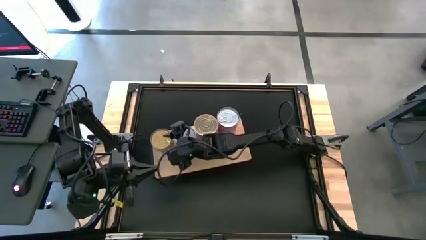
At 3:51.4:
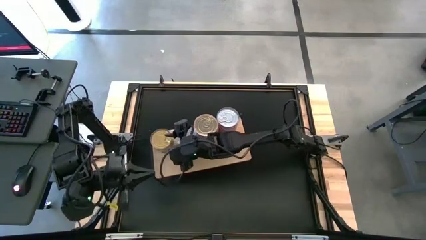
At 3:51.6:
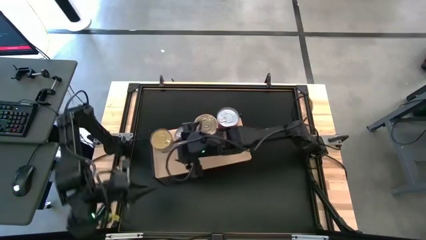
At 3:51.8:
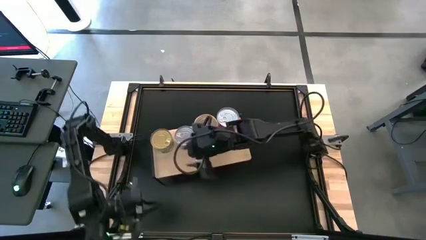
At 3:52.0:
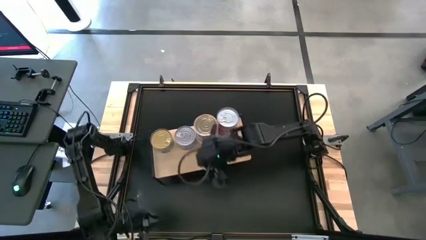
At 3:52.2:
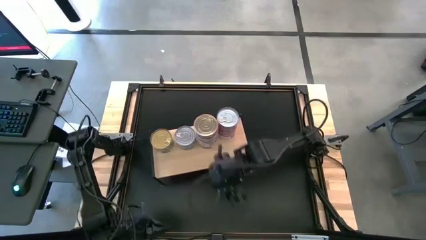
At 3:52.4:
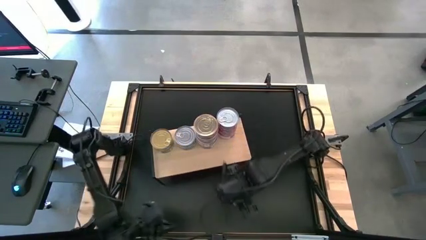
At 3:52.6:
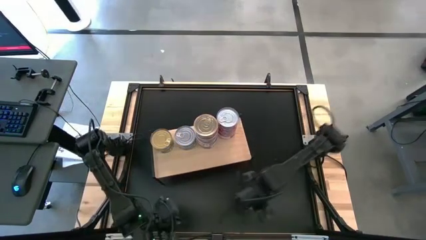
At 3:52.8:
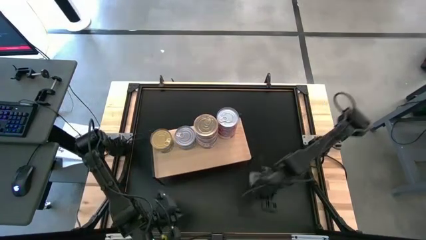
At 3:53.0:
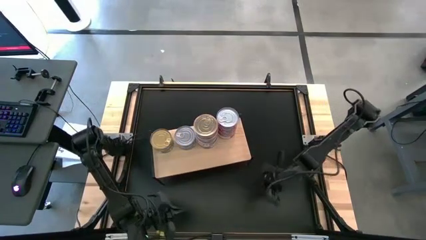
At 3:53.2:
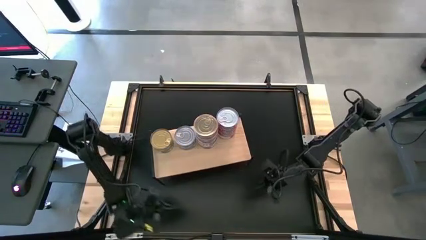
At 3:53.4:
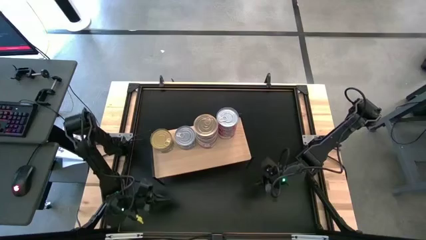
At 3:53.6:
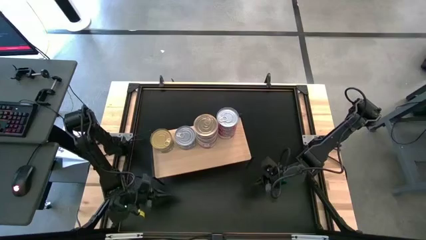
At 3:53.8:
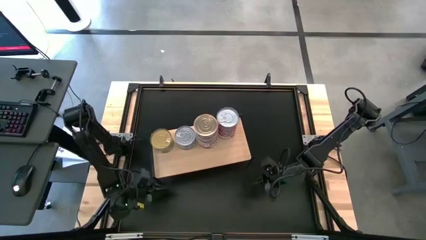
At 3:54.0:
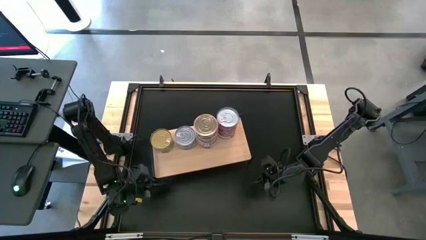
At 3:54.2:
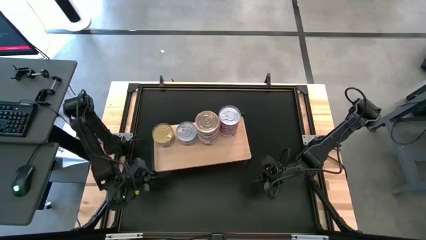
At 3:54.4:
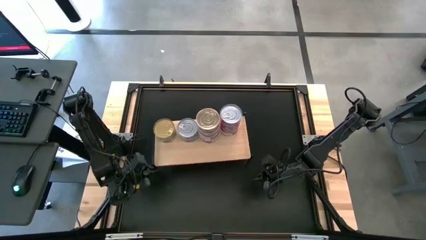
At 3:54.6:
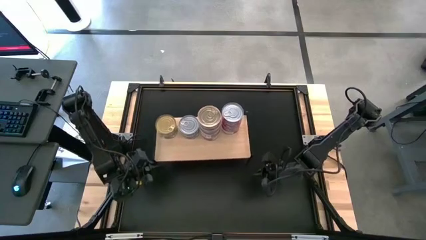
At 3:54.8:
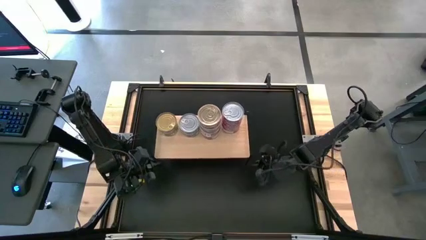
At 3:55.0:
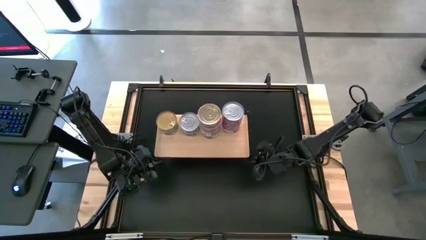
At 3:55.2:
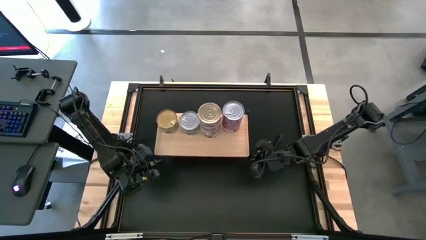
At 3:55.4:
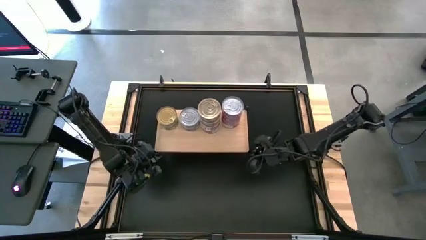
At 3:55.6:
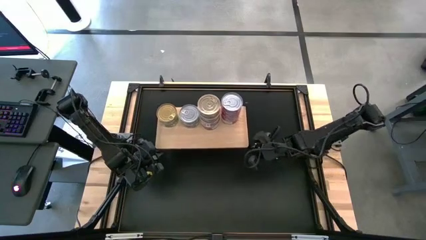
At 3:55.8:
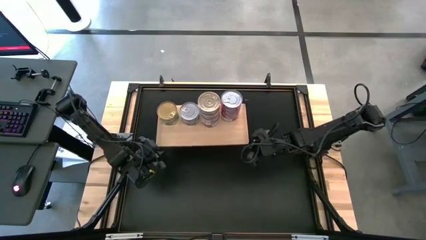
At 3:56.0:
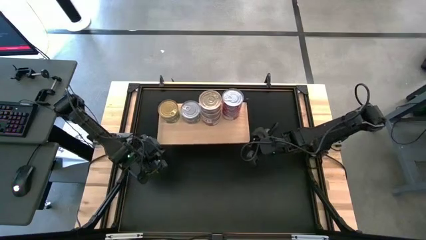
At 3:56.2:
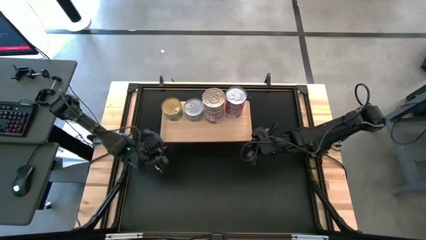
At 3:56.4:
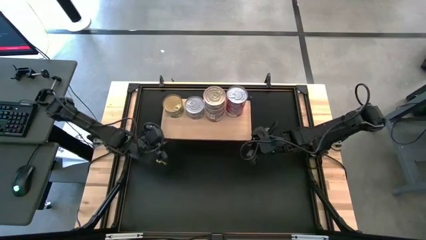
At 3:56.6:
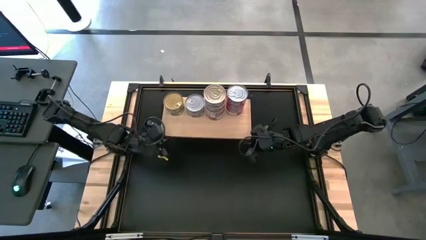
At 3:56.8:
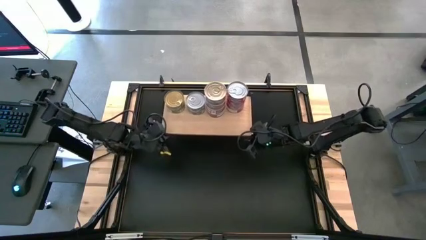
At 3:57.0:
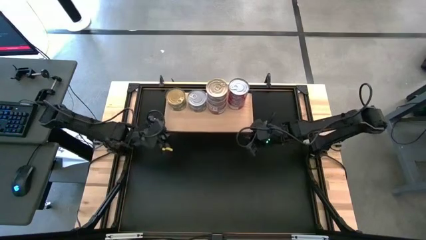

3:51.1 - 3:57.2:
Task: Stack canned seafood by type on shelf
Adjust the shelf to the top of the table

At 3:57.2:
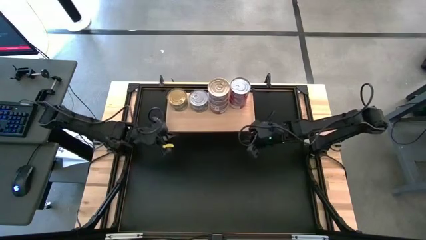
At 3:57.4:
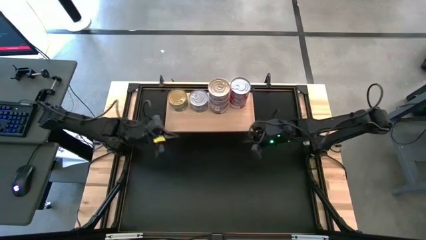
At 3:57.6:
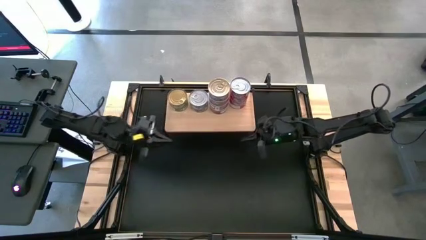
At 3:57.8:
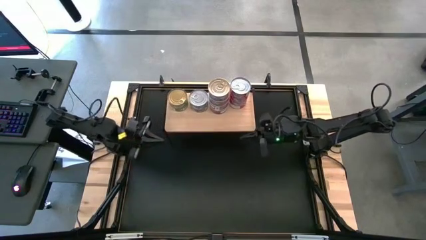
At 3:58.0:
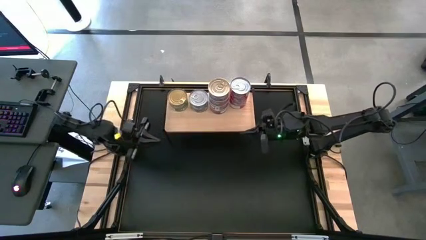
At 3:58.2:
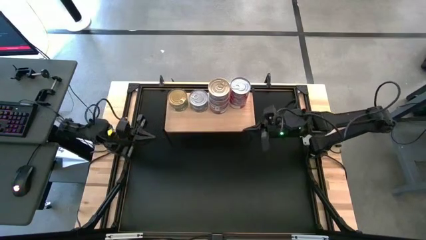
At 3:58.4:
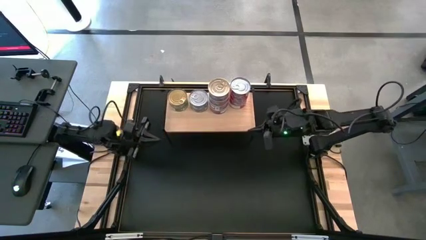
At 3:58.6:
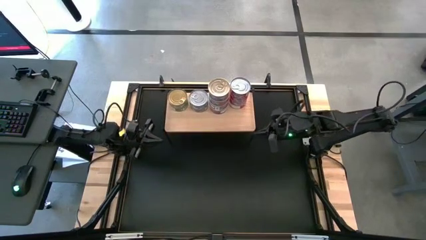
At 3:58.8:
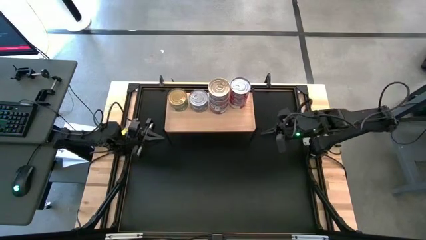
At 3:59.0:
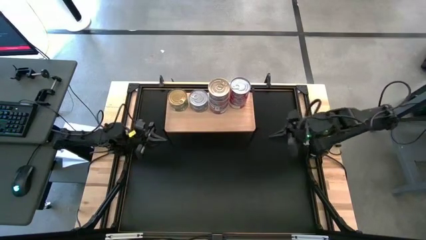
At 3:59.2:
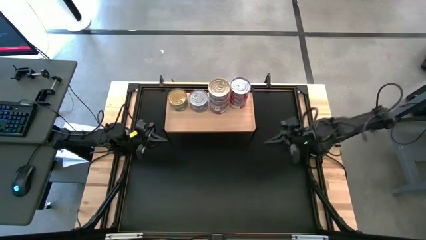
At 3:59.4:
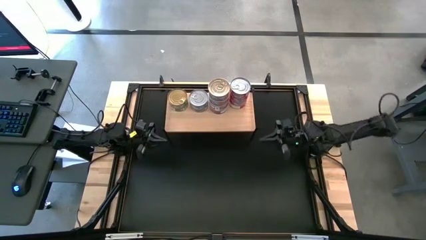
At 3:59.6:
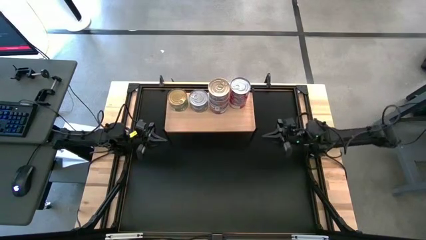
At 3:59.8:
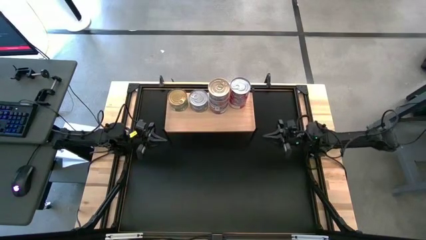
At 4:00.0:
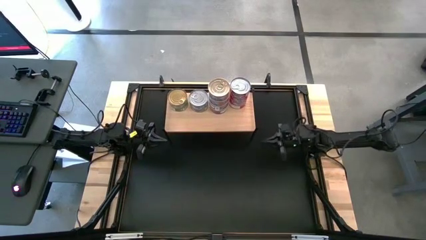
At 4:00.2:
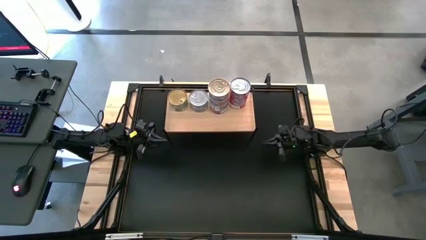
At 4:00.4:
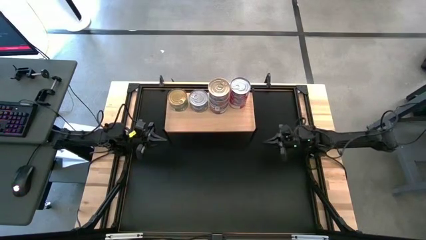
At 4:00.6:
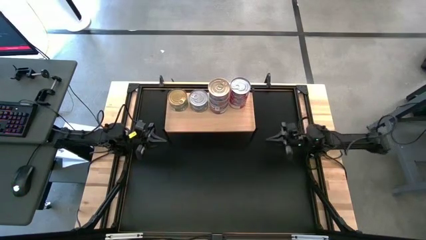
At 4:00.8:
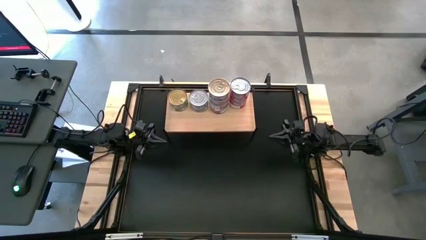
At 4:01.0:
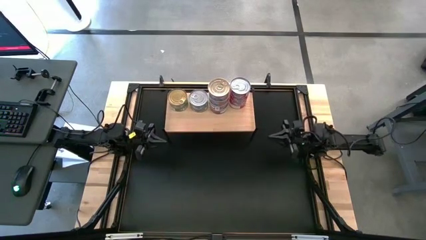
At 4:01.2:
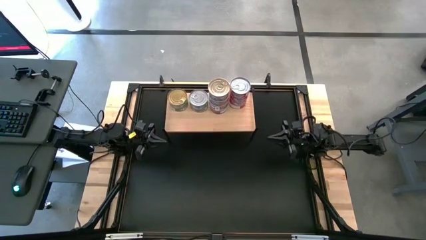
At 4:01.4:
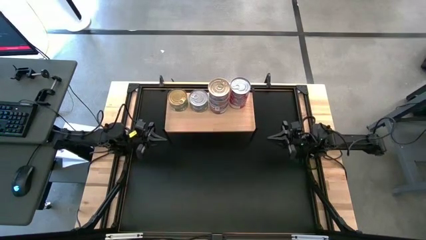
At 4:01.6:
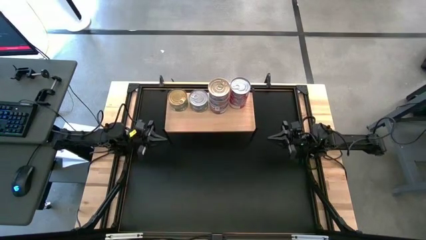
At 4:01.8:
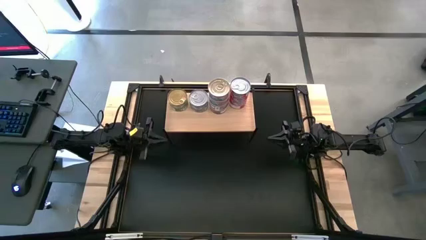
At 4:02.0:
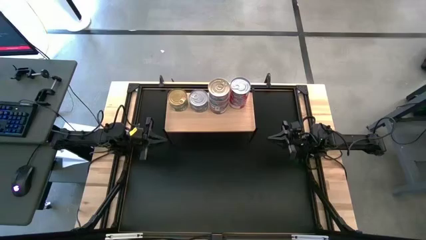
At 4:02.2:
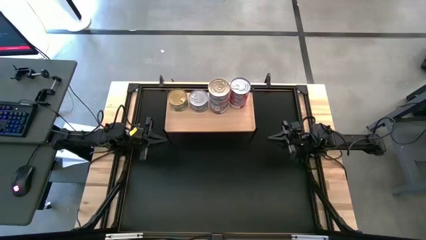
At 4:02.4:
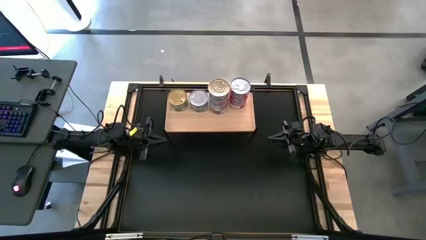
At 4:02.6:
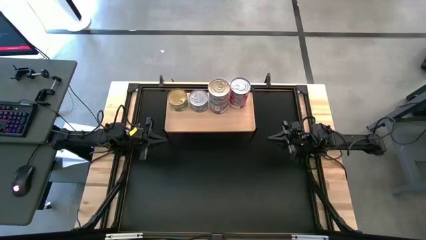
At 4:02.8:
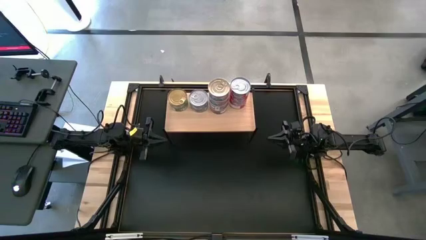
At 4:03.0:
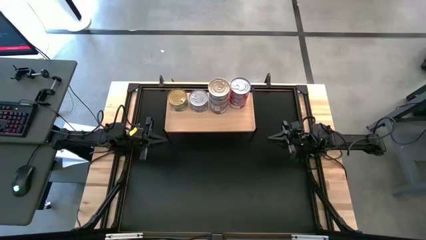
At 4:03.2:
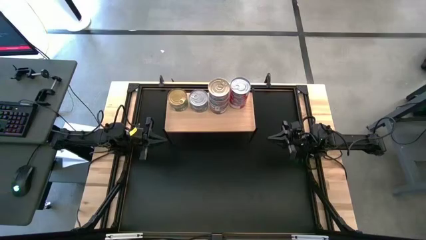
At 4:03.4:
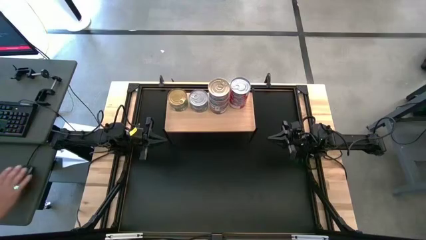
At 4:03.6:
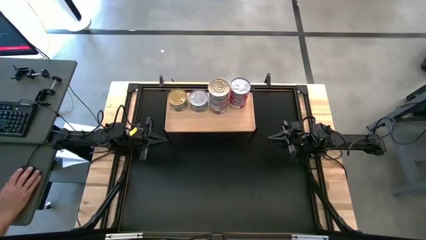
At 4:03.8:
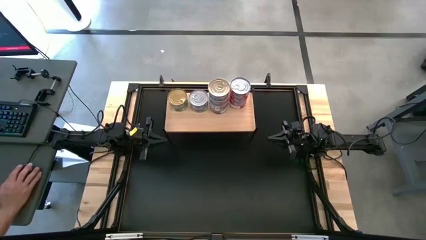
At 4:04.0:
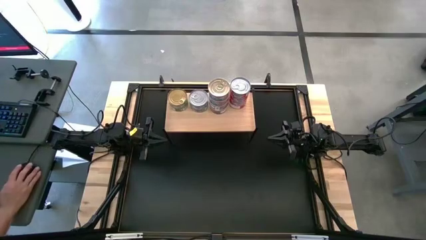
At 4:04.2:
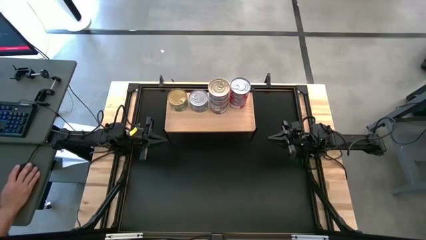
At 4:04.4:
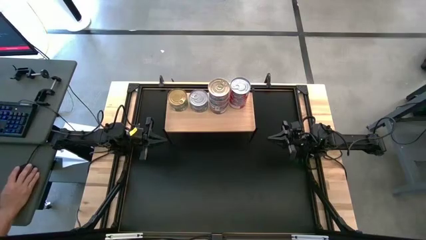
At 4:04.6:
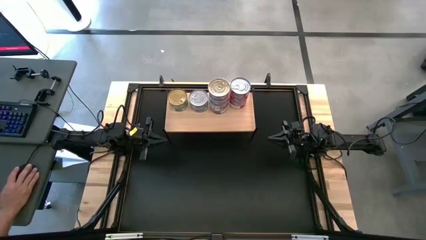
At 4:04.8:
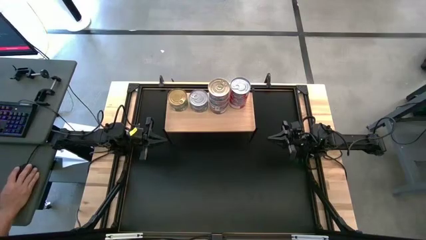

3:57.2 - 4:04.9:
Return to Home Position

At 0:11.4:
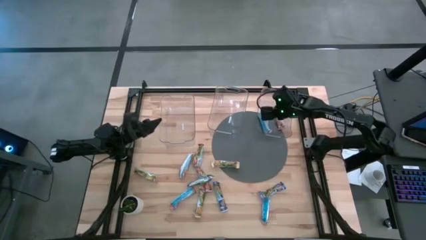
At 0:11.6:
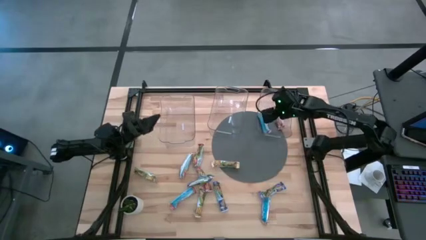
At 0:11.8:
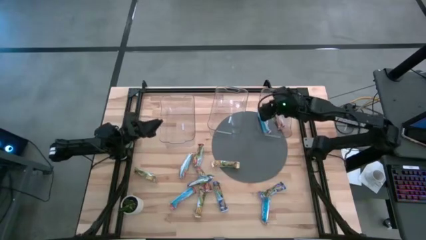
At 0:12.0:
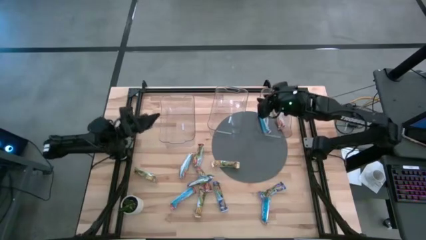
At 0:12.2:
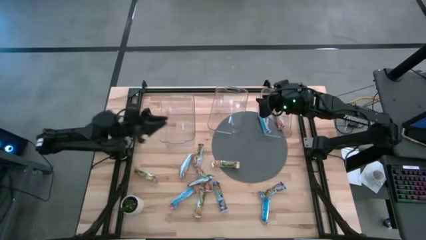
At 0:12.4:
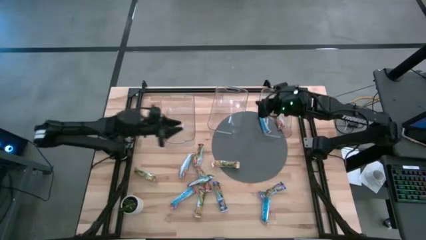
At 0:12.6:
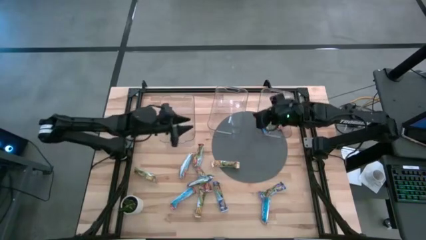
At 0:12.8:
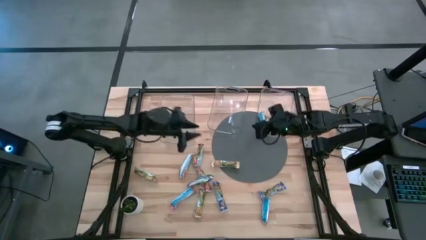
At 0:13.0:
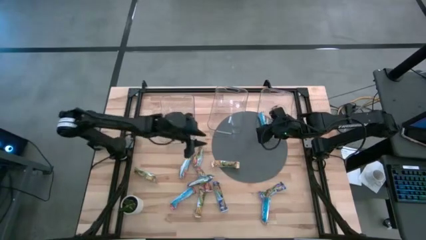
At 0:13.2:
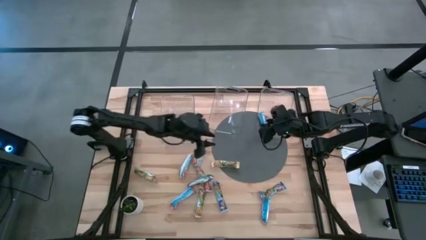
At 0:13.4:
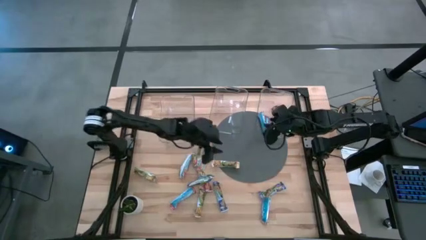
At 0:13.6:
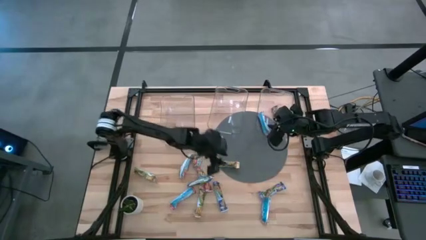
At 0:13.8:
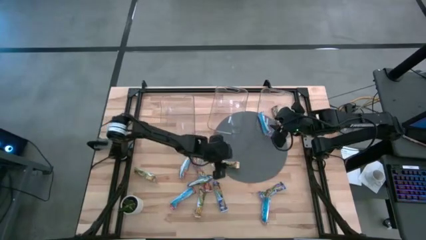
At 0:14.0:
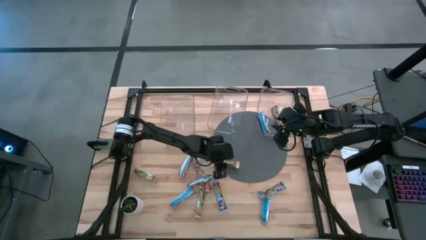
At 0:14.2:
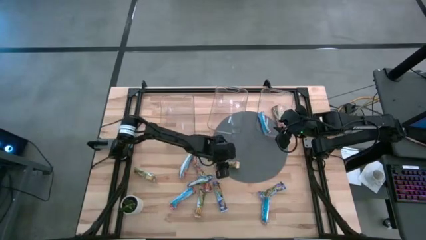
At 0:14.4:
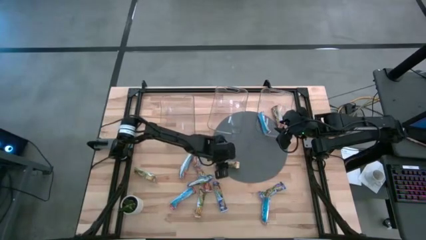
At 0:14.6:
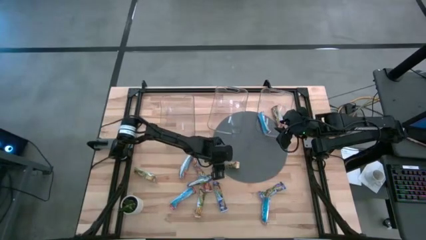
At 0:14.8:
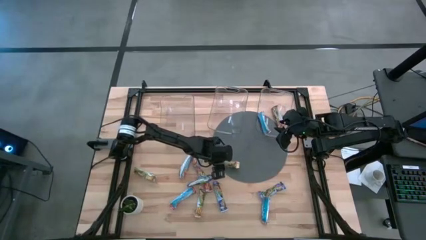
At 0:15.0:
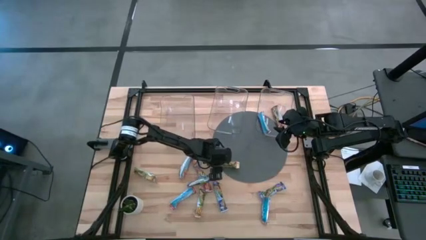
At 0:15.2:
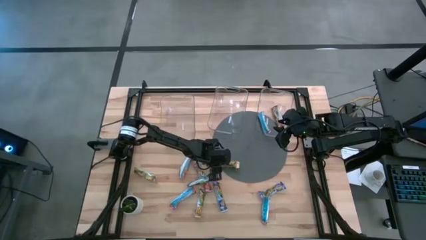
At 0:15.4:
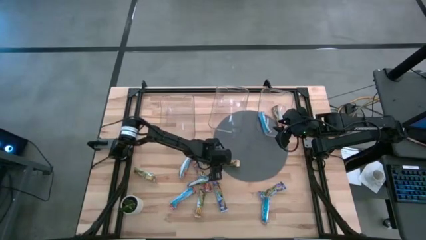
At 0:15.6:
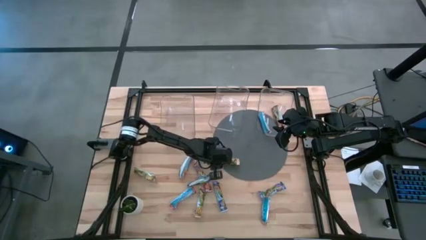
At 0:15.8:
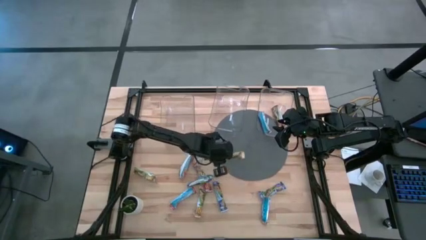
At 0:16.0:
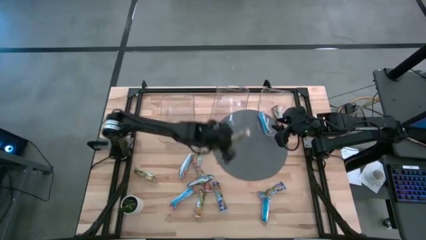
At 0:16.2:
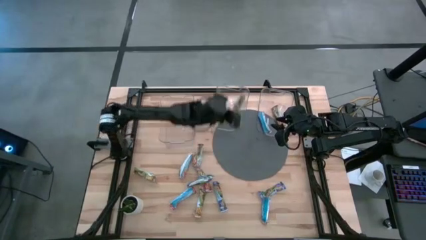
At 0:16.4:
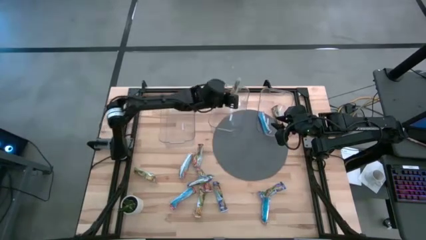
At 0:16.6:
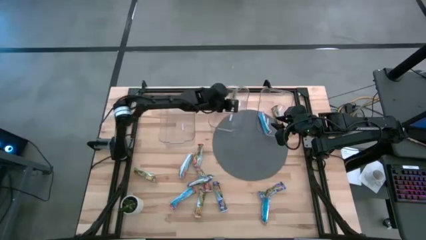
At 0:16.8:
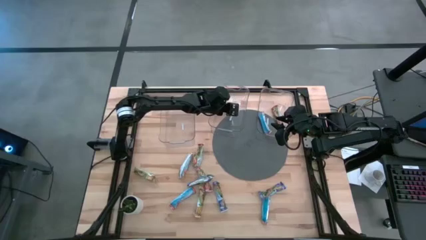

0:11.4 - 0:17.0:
Task: Pick and place Granola Bars by type
Put the yellow granola bar into the middle transparent bin
